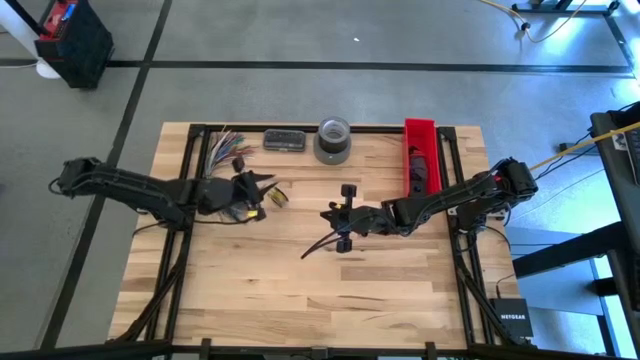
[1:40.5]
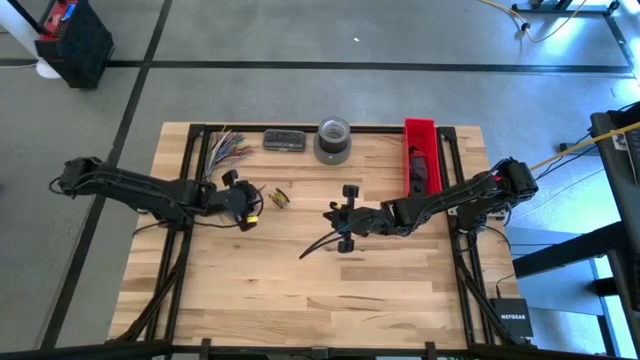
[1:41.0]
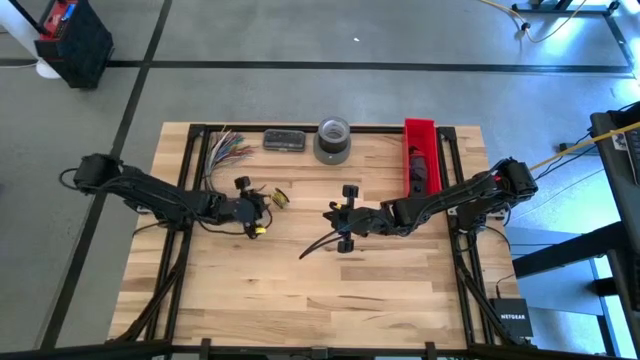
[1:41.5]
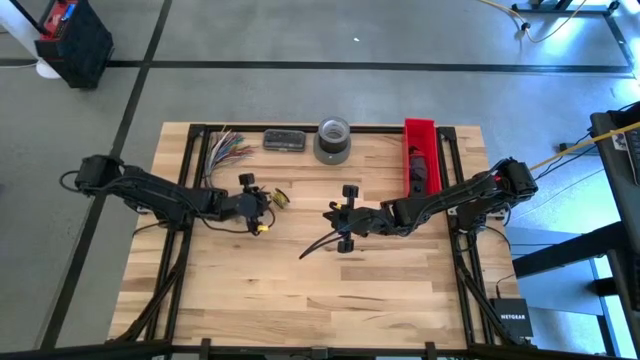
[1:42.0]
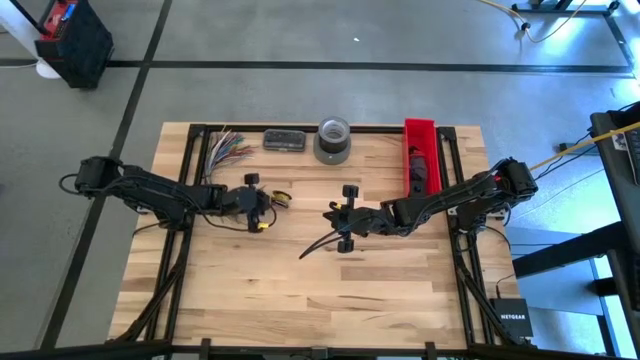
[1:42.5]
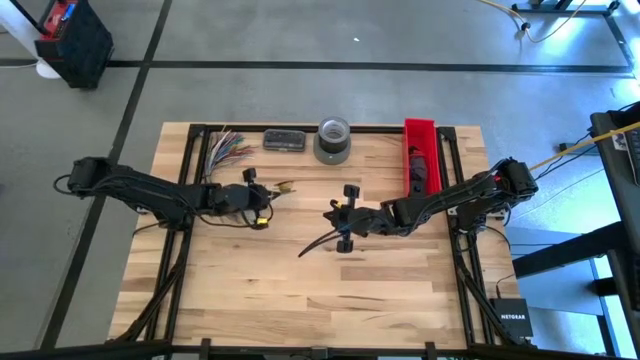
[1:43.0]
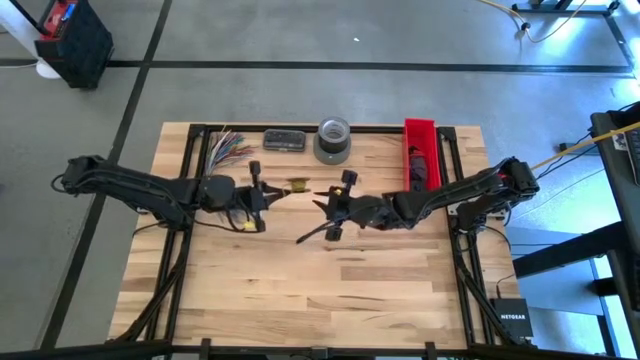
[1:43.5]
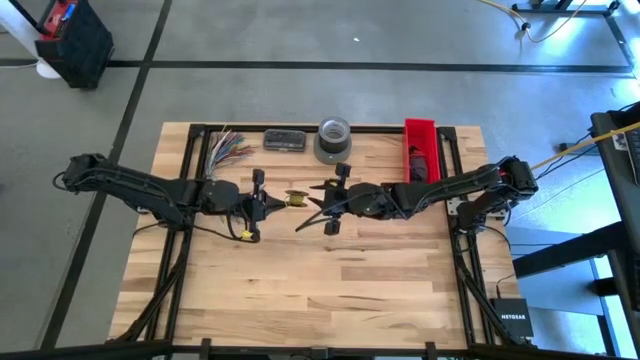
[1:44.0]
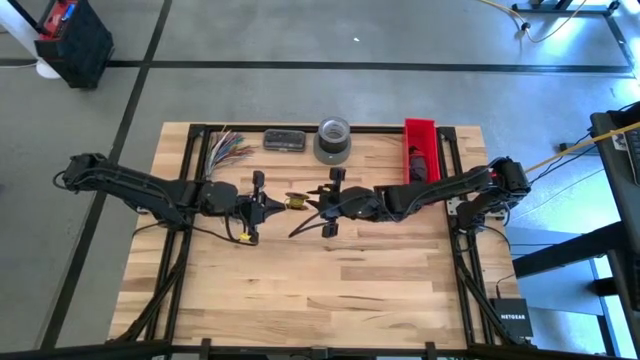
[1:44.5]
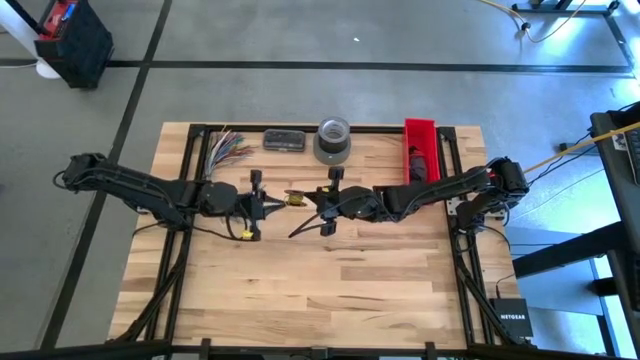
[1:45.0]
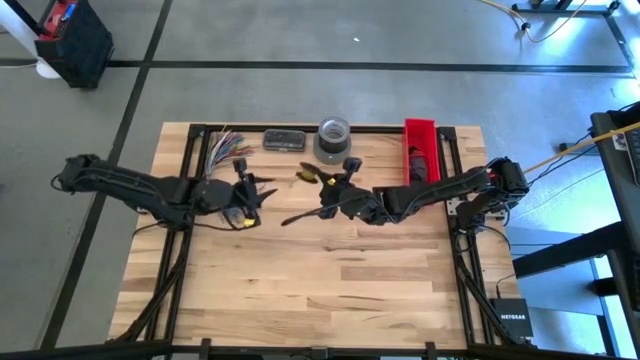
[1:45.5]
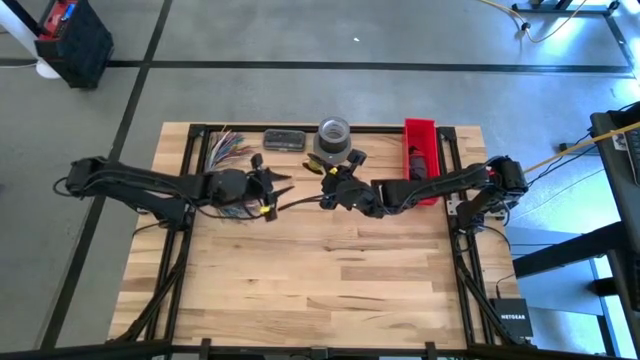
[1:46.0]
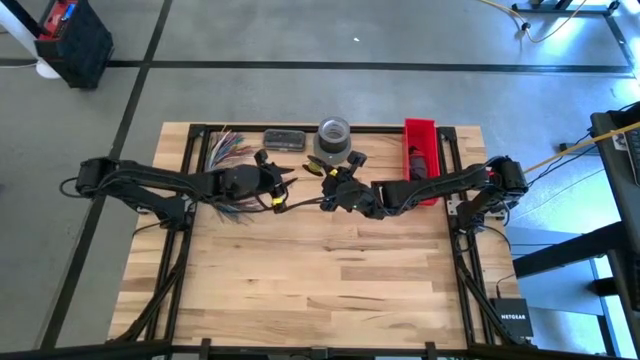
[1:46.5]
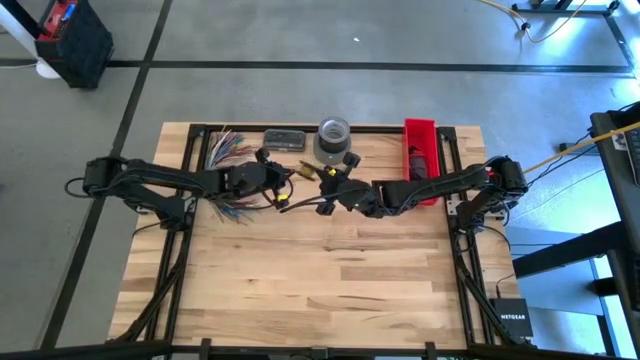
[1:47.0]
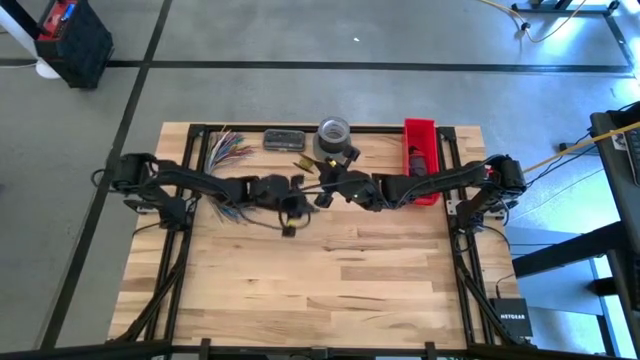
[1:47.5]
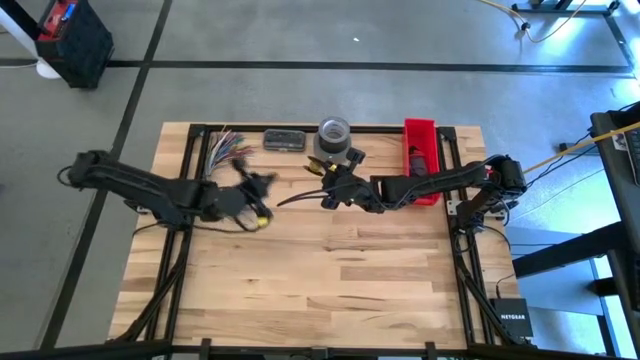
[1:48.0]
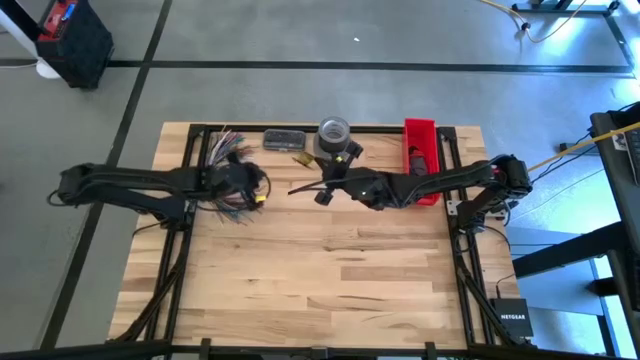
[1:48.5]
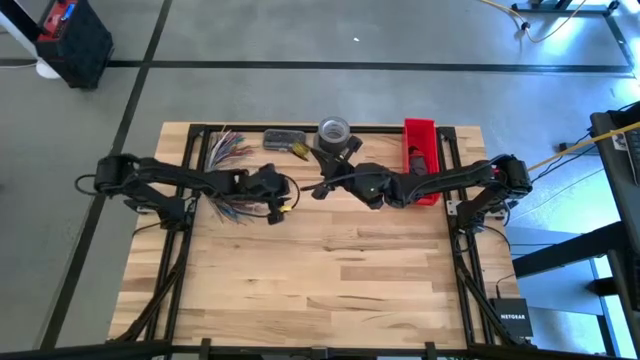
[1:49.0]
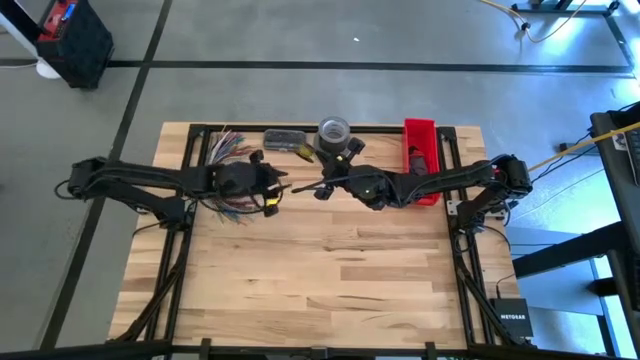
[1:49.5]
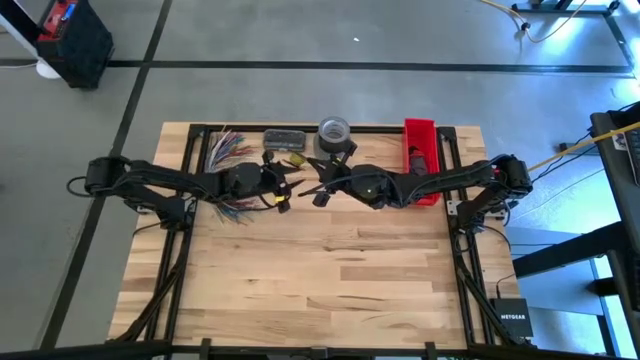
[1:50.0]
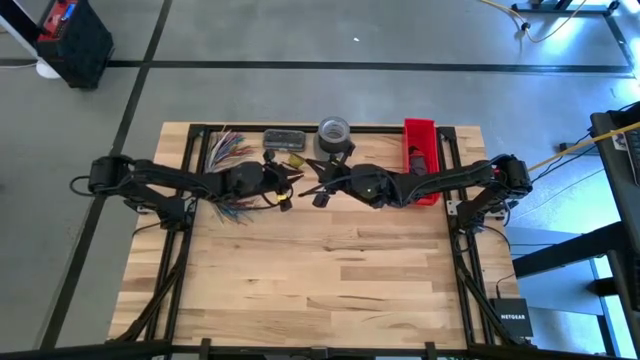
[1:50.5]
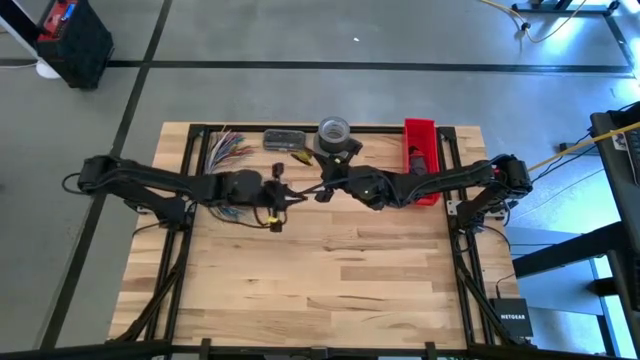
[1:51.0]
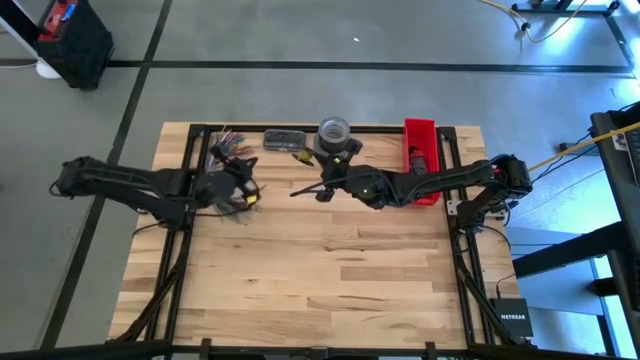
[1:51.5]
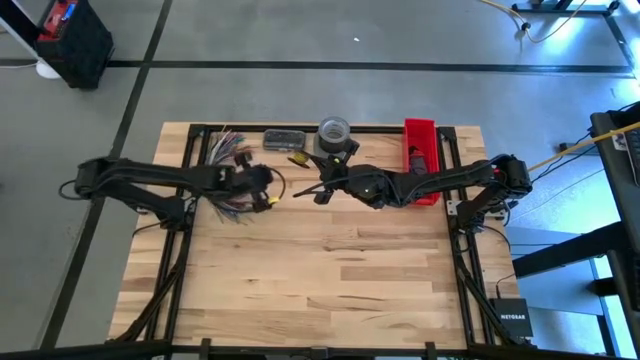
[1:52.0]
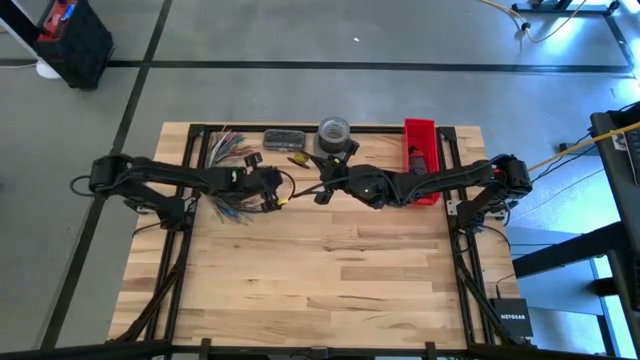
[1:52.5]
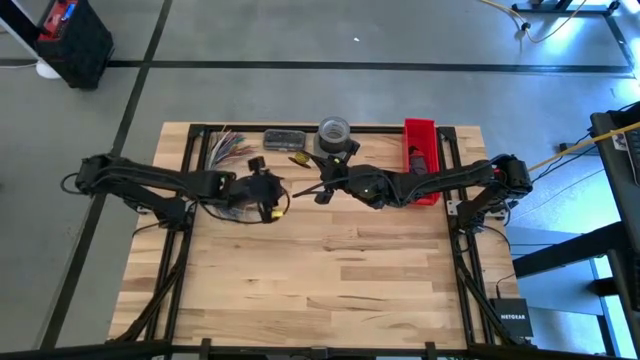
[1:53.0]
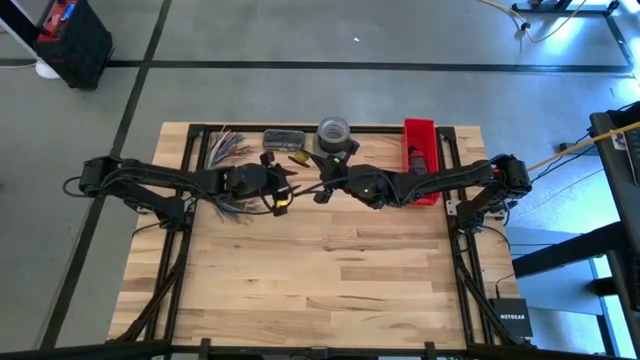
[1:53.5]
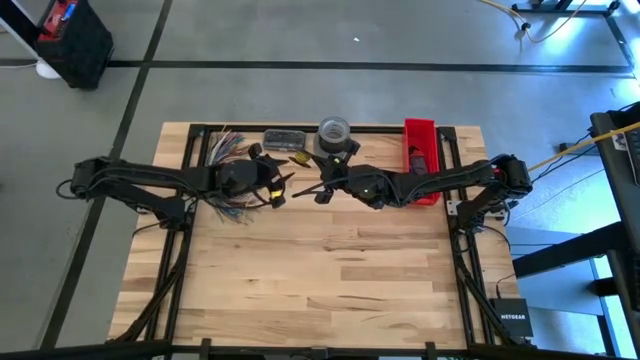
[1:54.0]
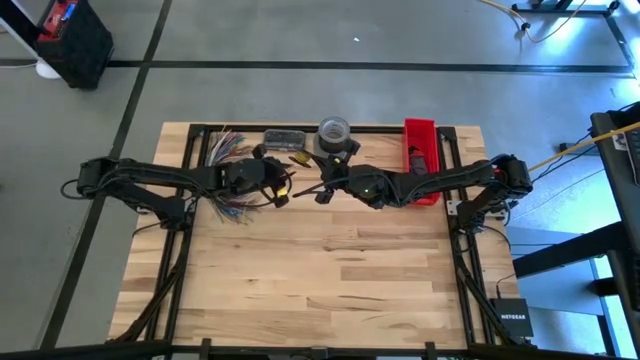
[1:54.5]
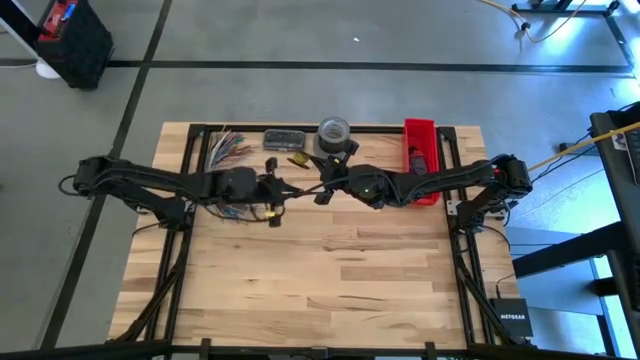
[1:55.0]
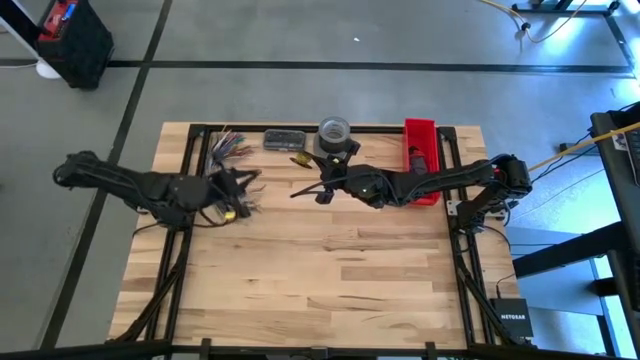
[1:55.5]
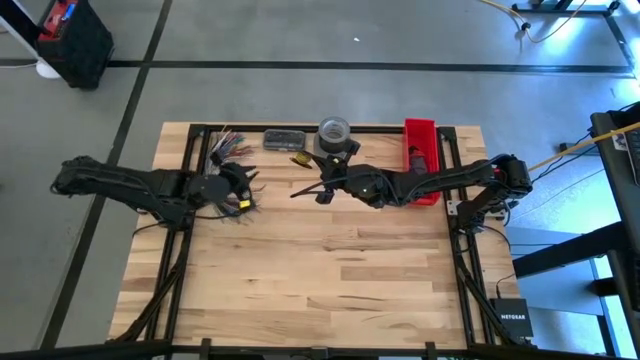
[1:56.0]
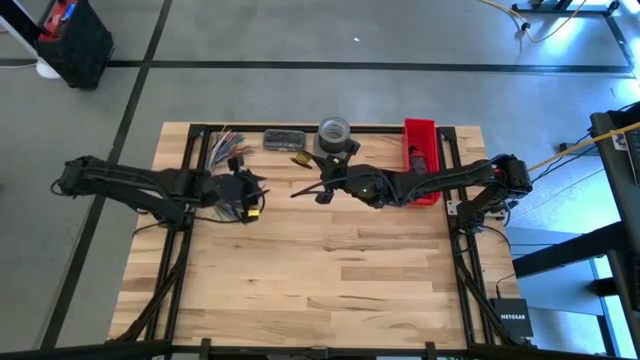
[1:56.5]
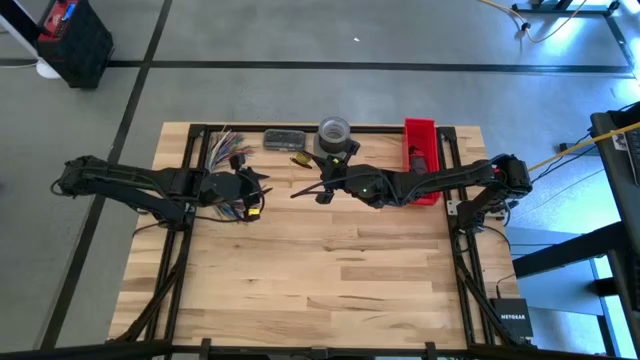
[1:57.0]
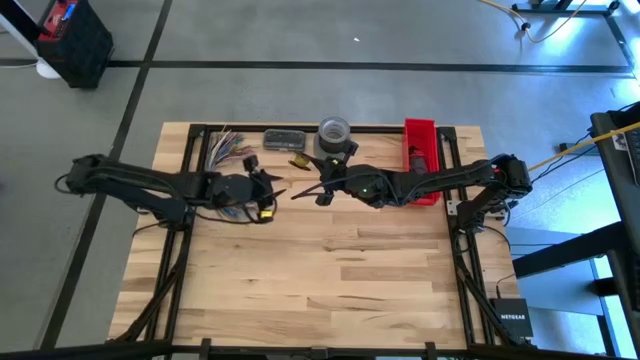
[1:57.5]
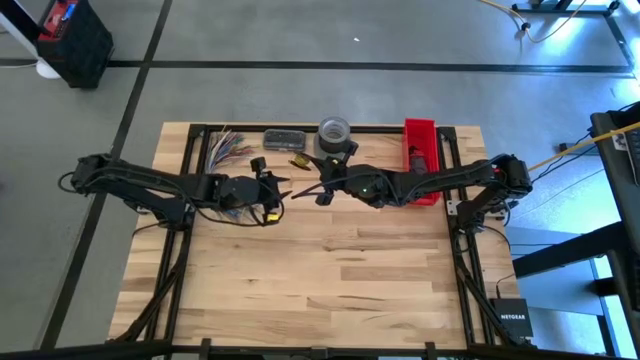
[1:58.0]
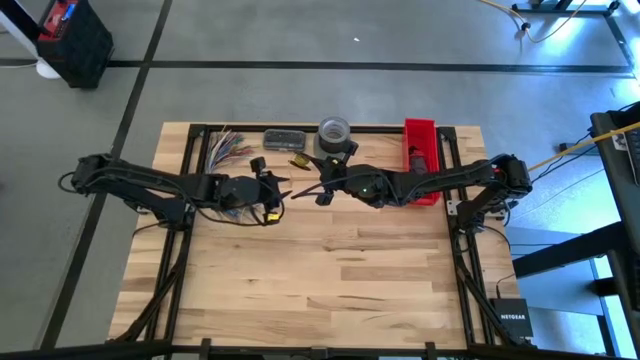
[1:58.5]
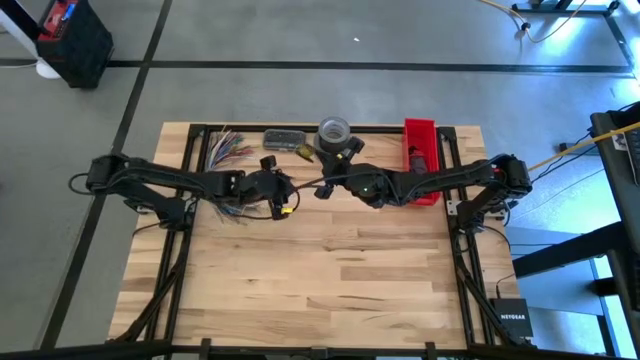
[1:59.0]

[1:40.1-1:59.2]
Task: Coil cords
Uncoil the yellow wire from the spool

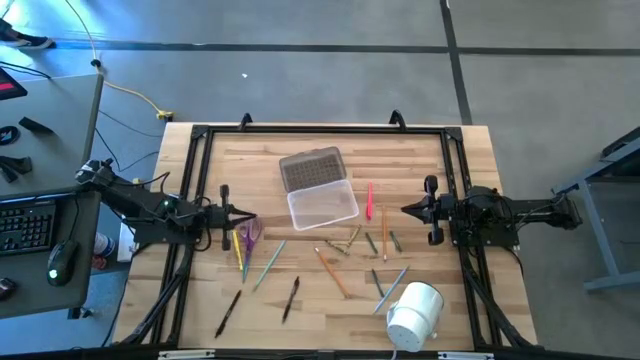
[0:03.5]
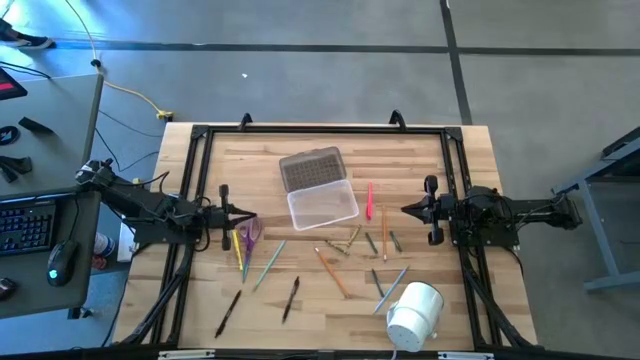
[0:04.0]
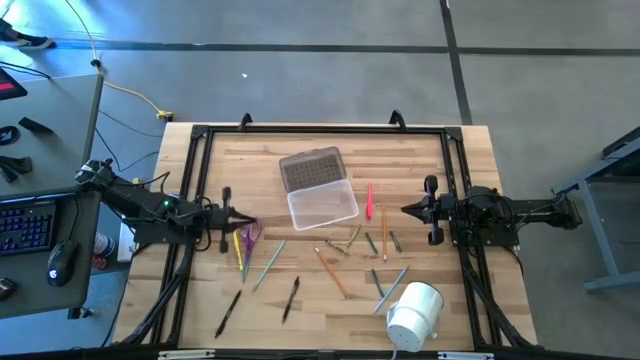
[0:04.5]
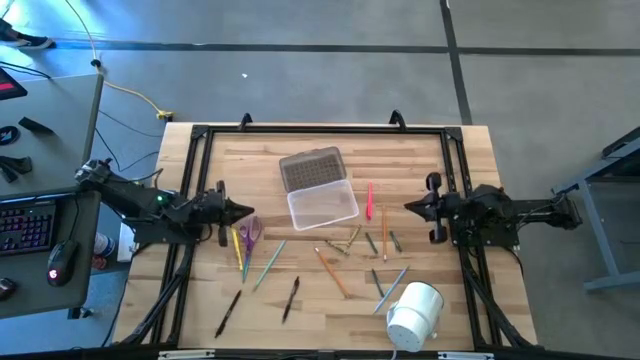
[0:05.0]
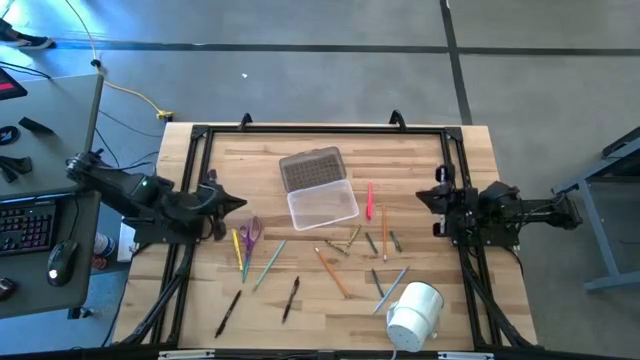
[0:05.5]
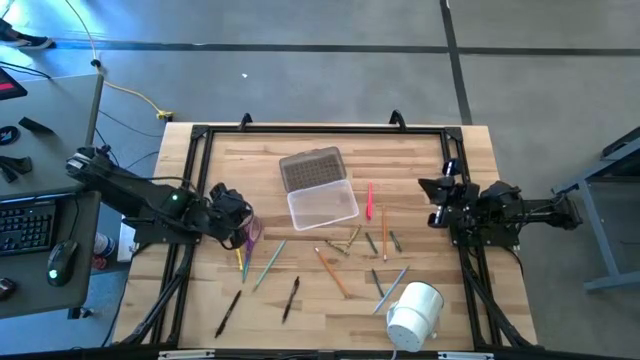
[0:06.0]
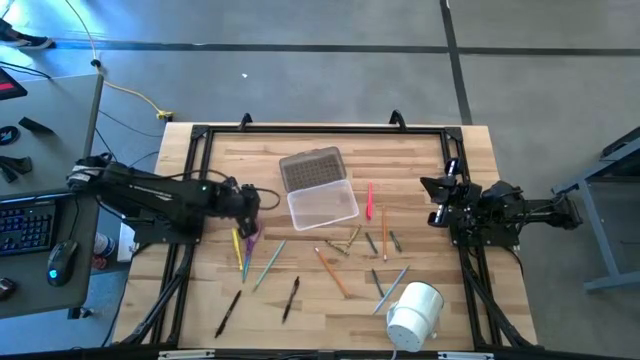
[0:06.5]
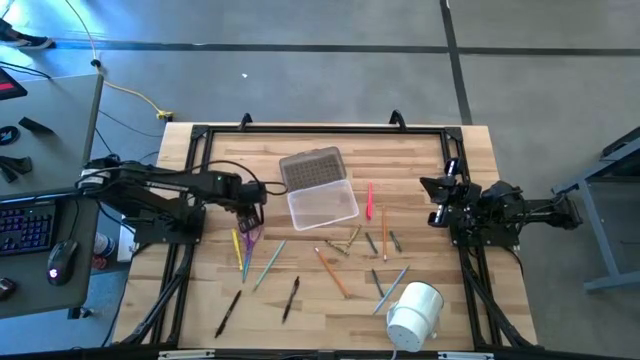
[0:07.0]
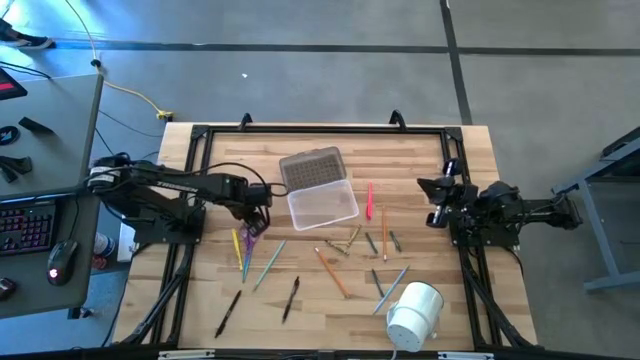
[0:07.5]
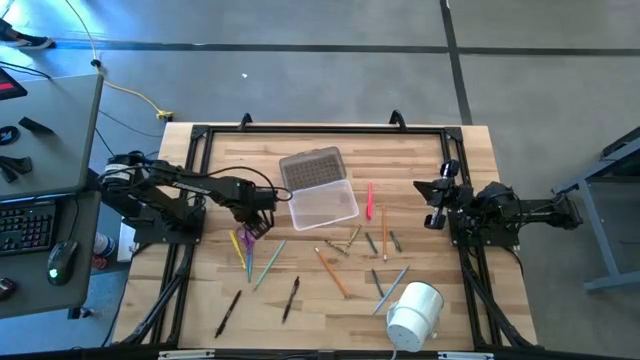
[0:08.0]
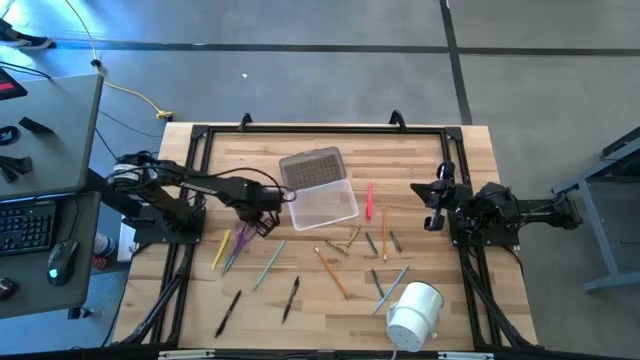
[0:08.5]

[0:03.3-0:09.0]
Task: Pick & place school supplies into a supply box
Put the purple scissors into the supply box
